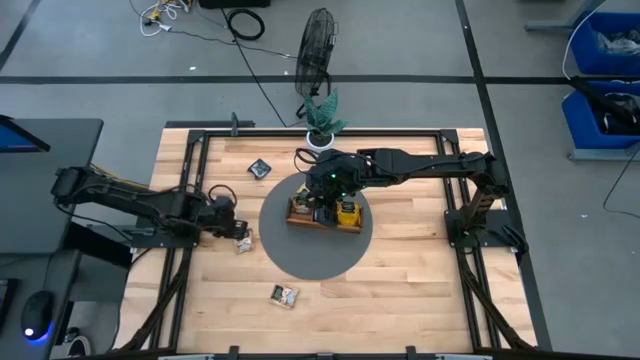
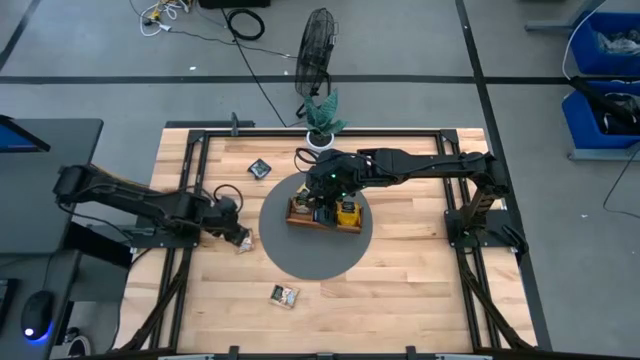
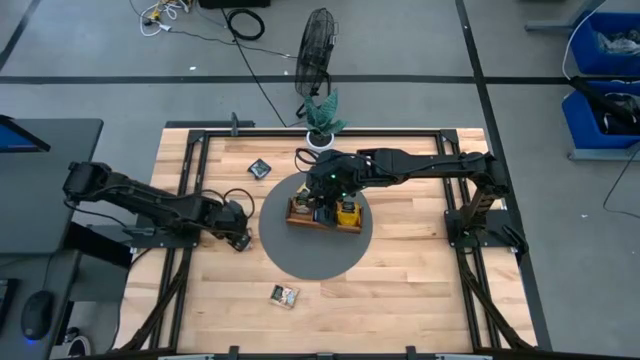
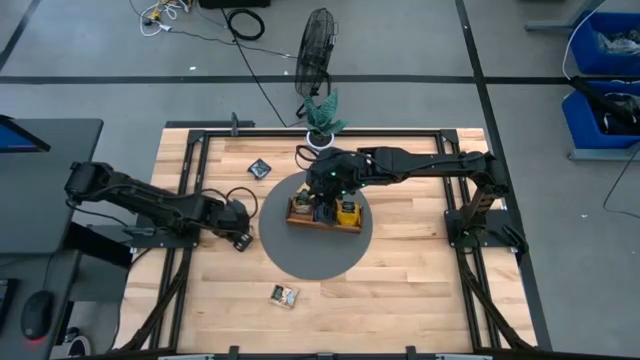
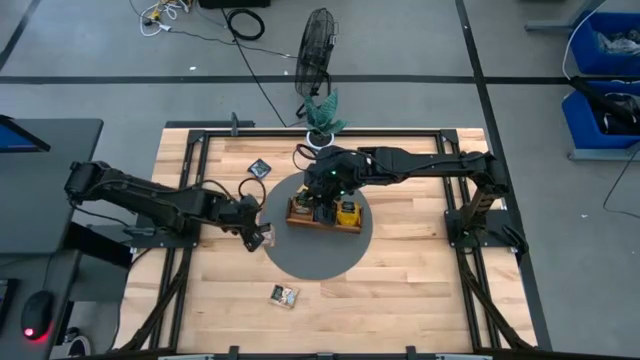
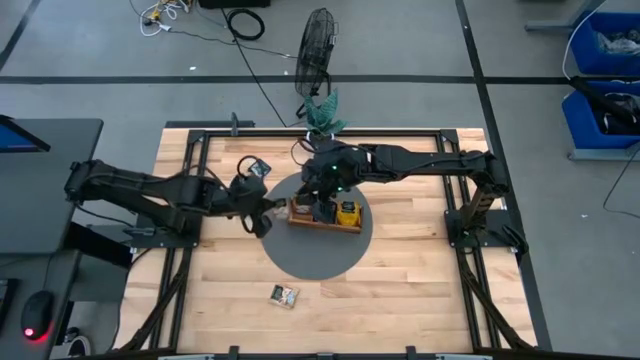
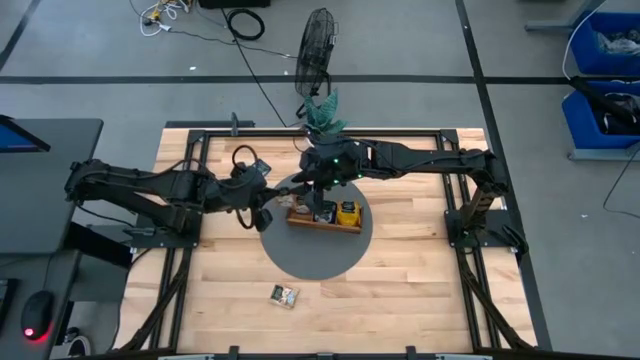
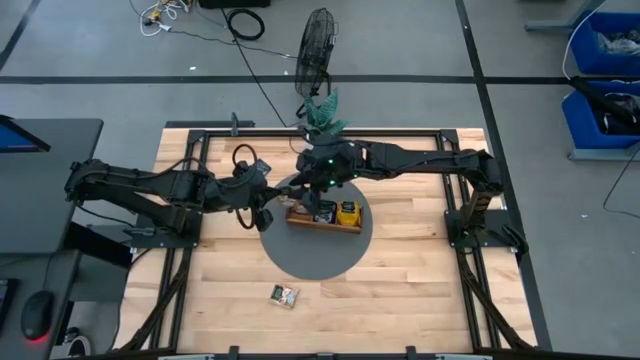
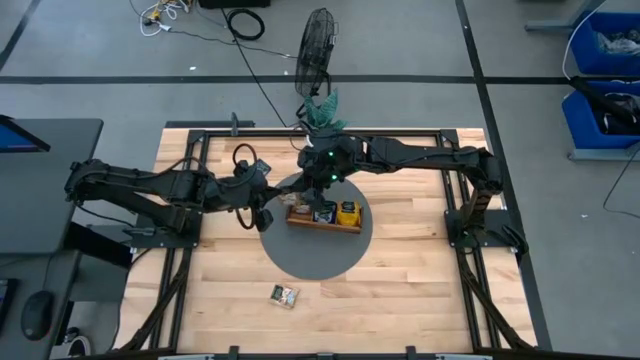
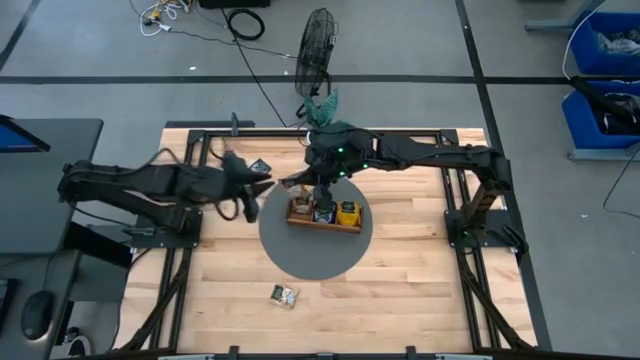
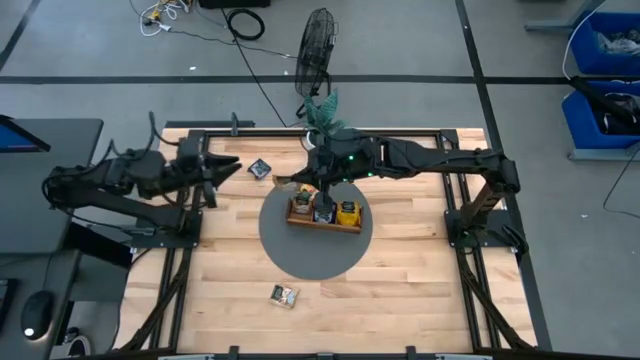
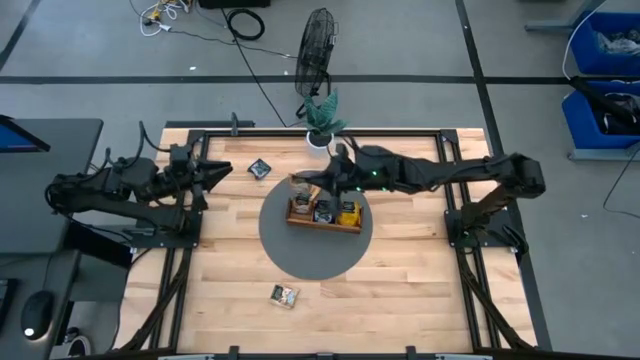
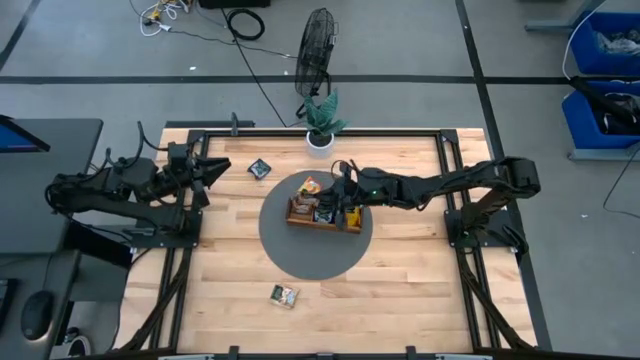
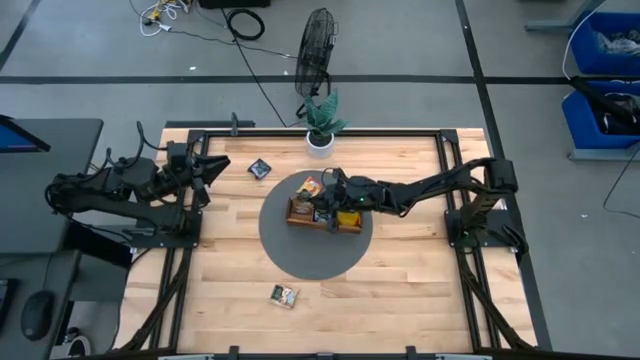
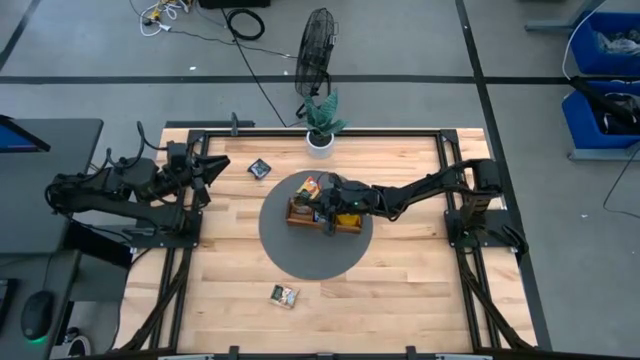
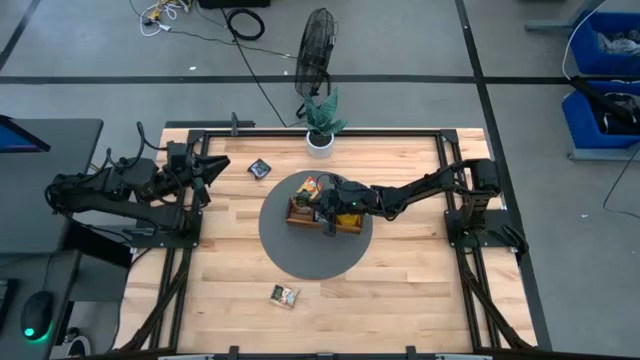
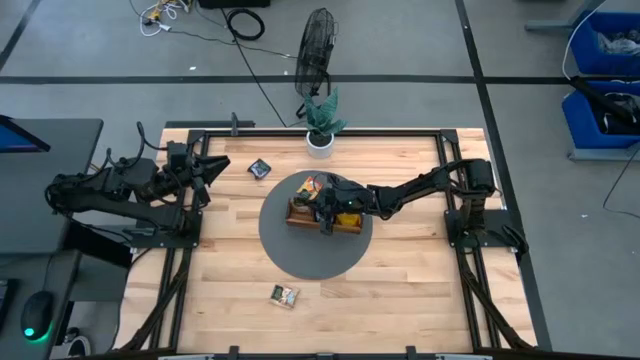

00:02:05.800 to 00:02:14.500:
Task: Pick & Place Tea
Put the brown tea bag into the left section of the wooden organizer

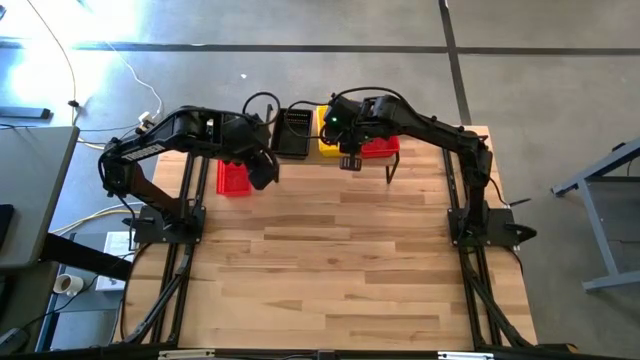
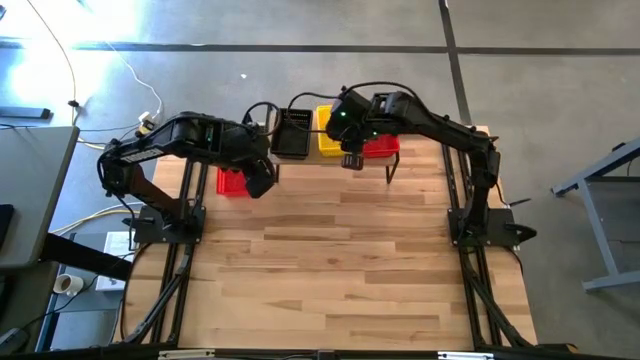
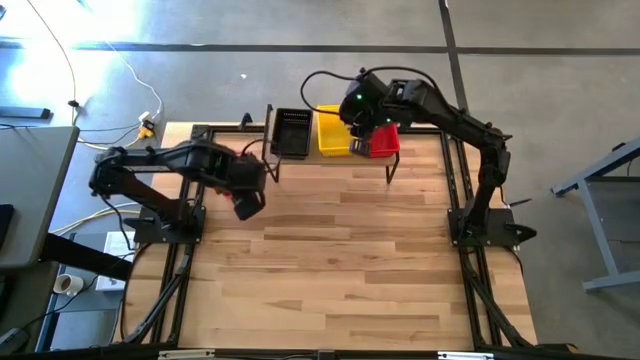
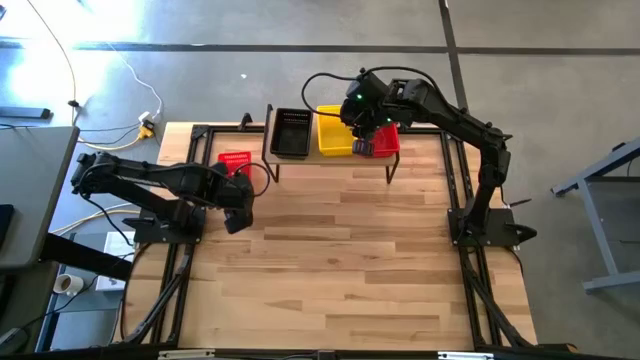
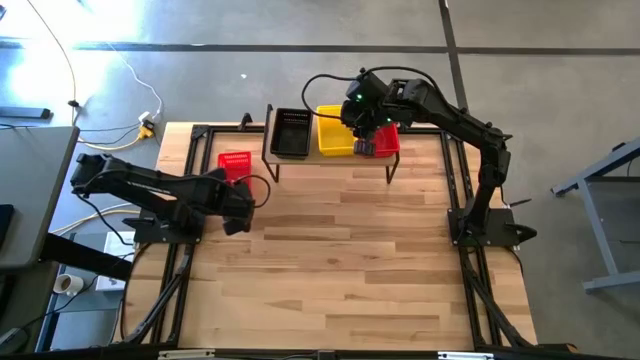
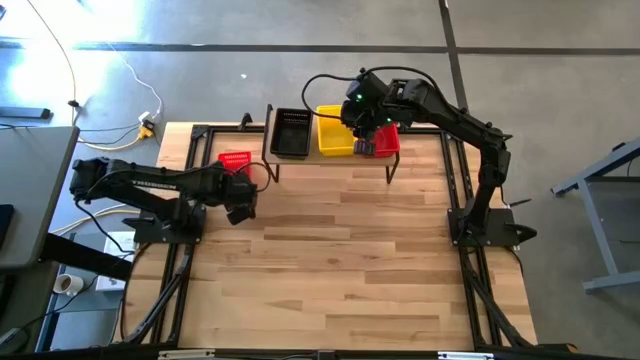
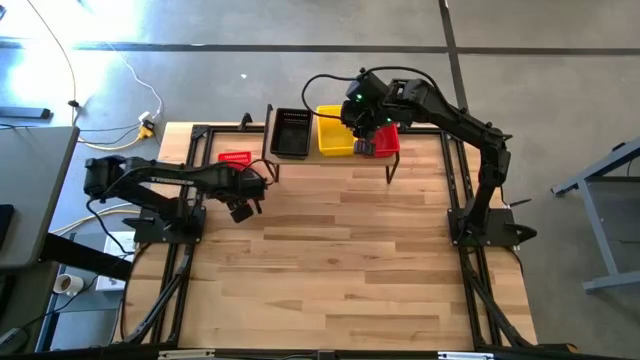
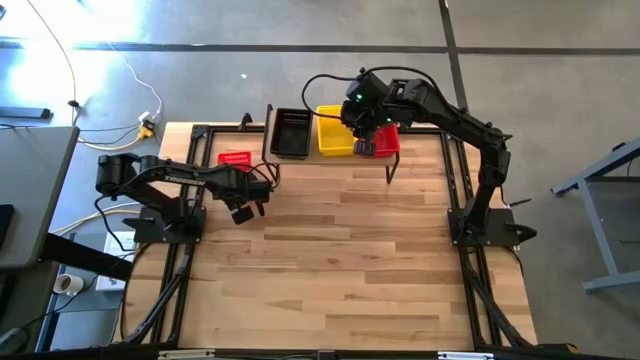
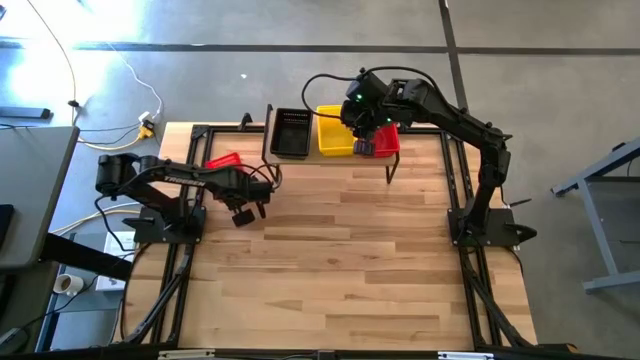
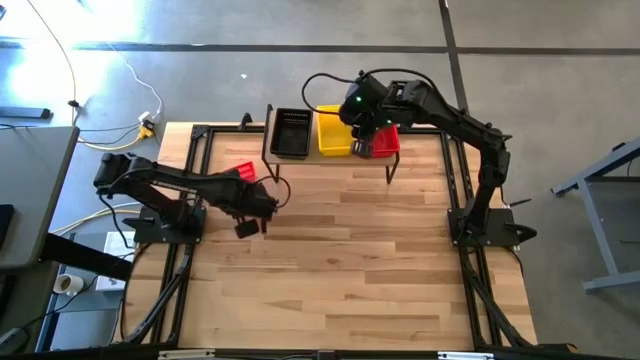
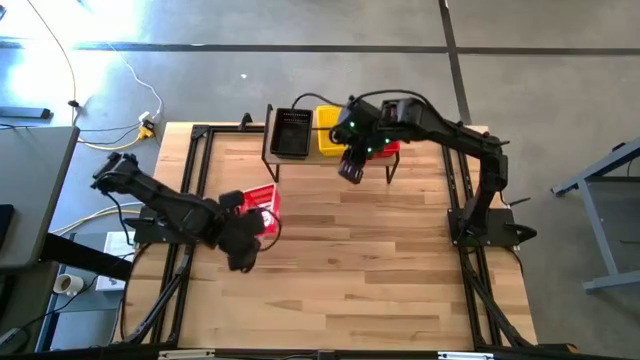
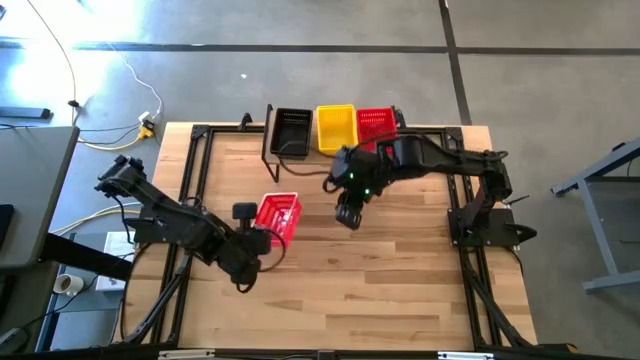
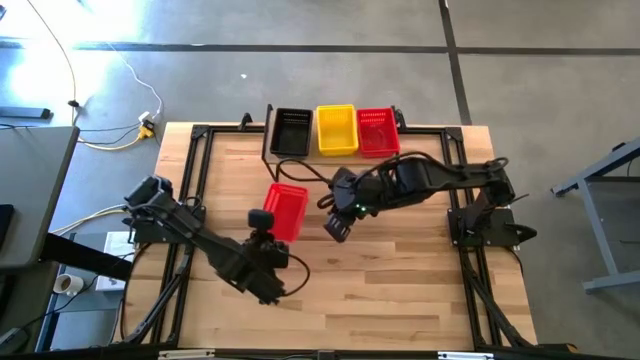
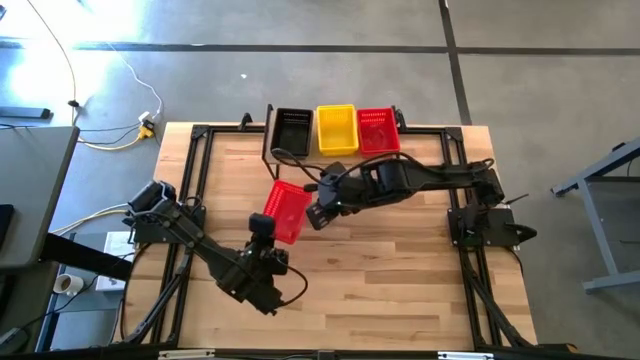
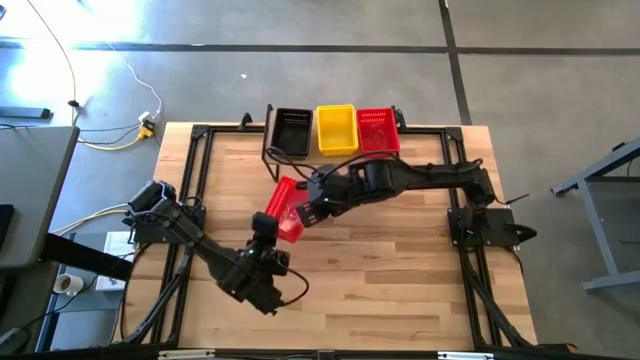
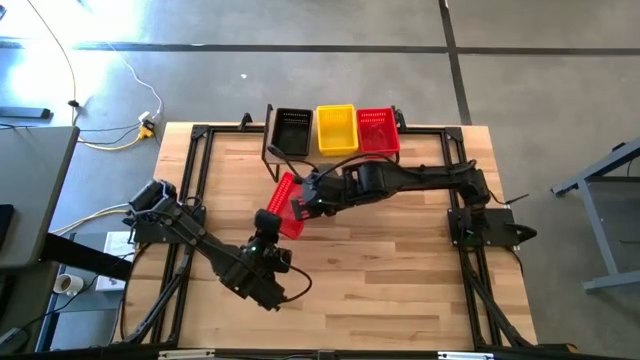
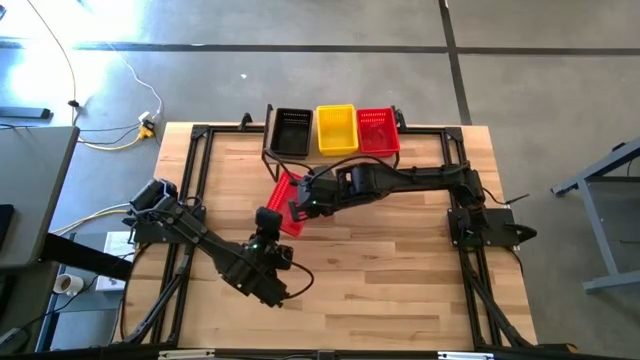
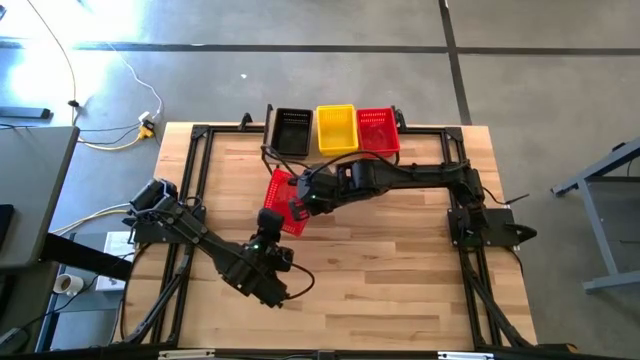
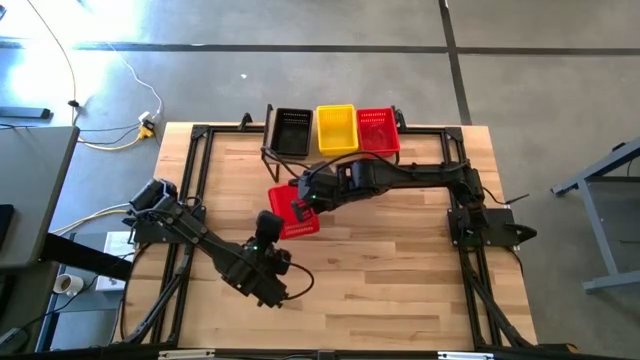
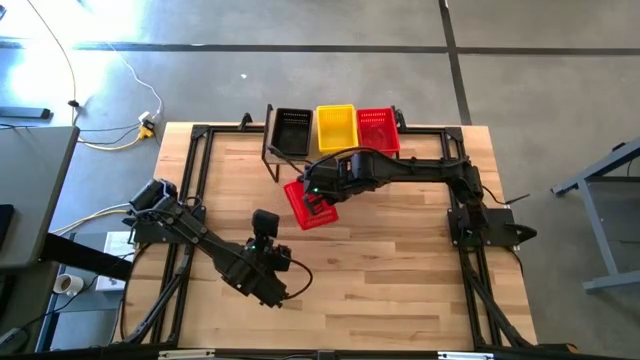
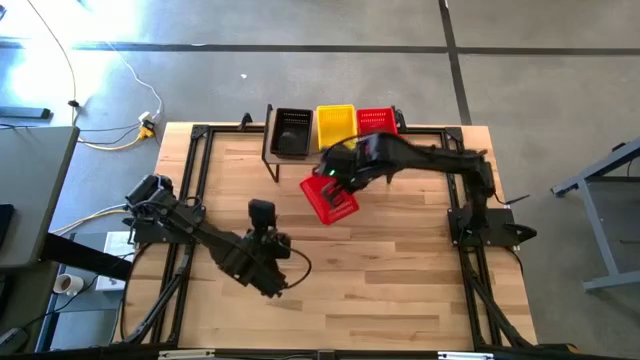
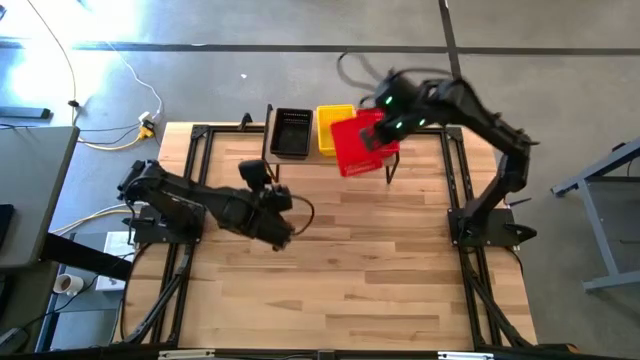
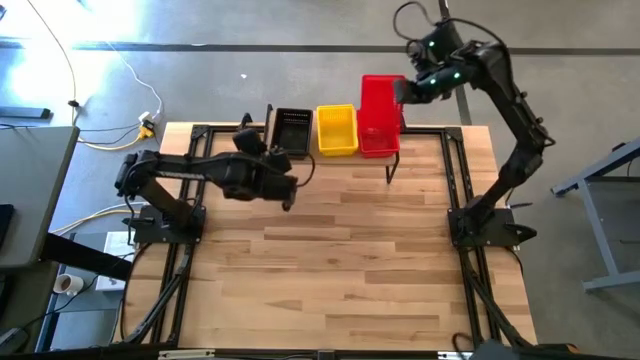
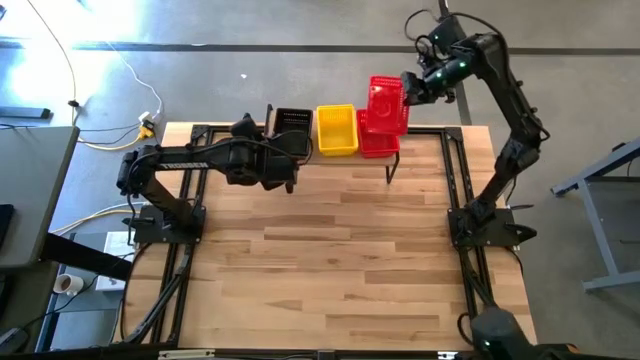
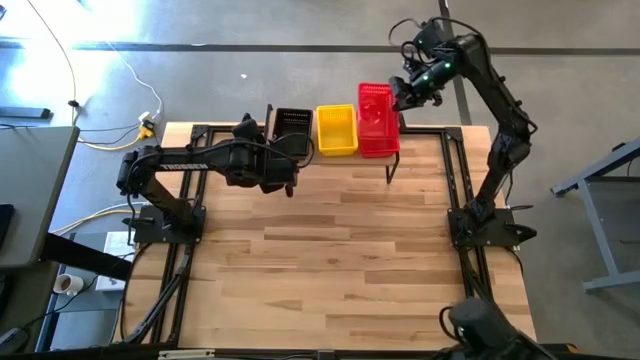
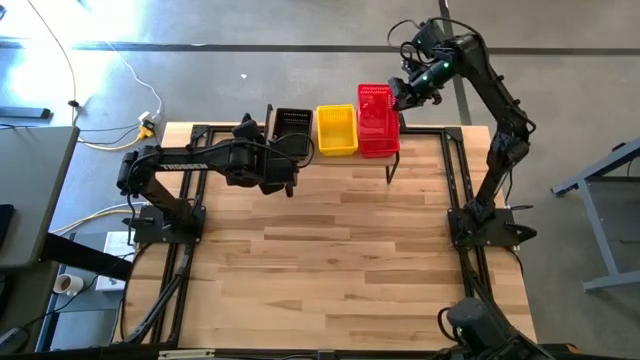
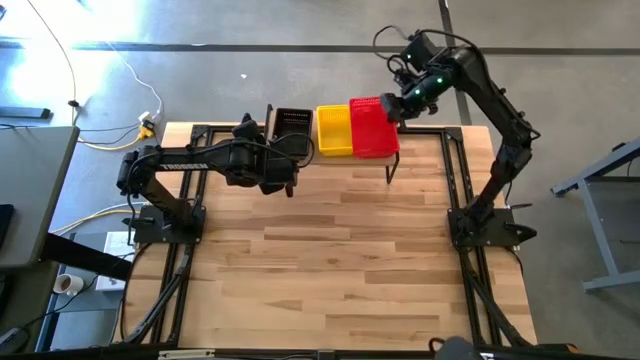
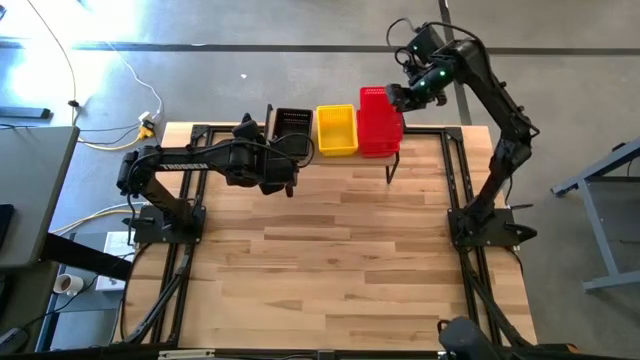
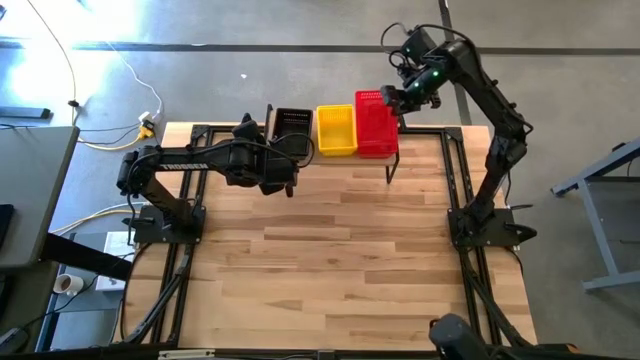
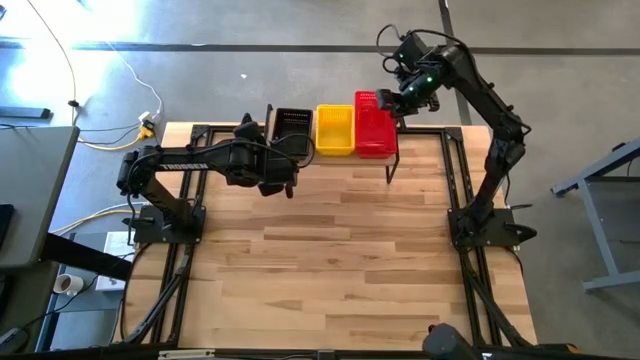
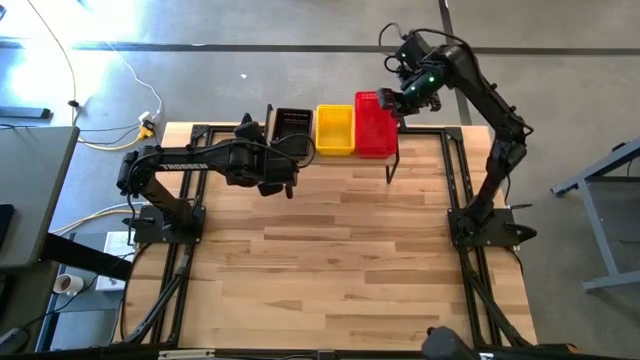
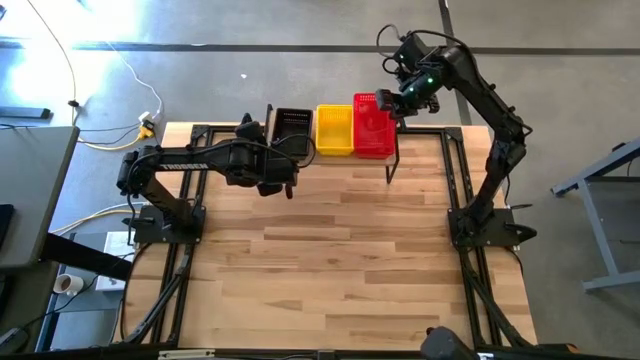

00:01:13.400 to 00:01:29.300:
Task: Stack baskets on shelf by color
Stack the red bin on top of the red bin on the shelf
